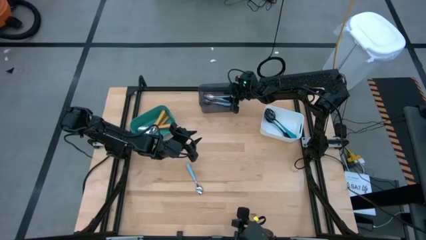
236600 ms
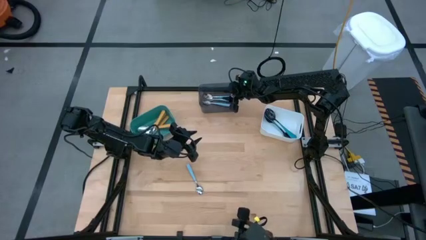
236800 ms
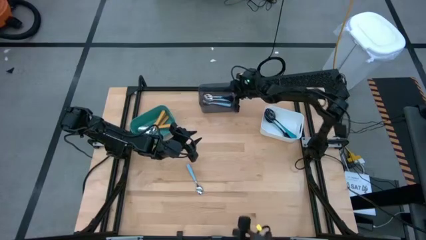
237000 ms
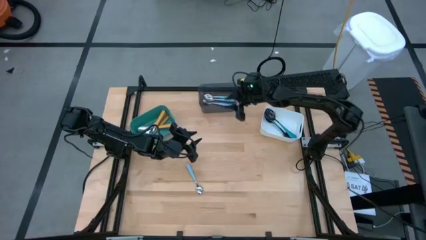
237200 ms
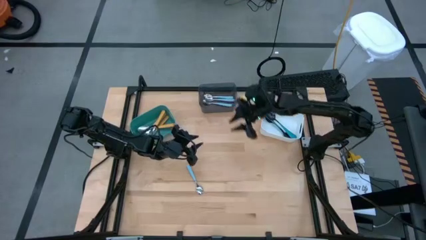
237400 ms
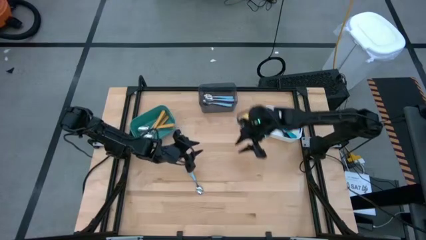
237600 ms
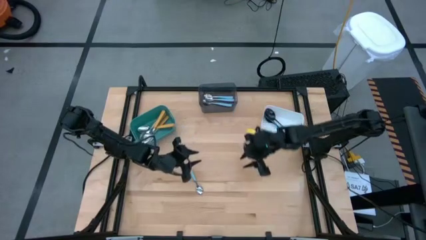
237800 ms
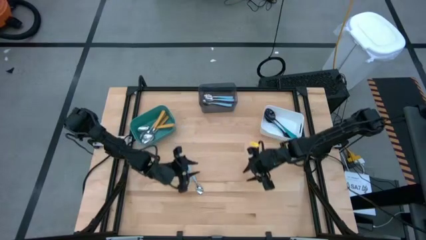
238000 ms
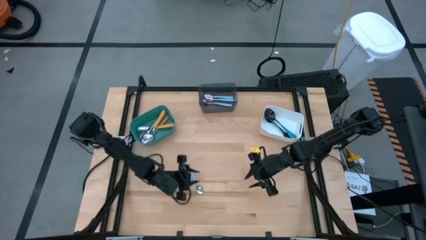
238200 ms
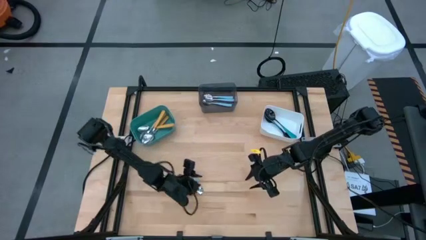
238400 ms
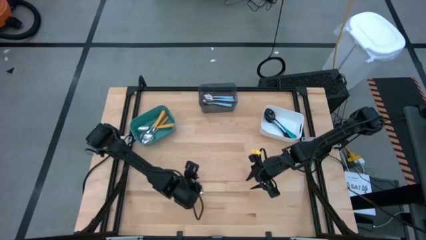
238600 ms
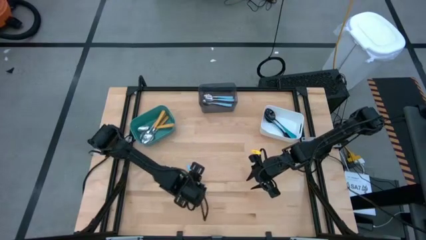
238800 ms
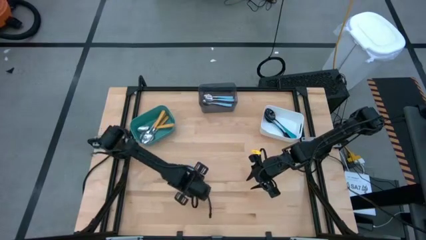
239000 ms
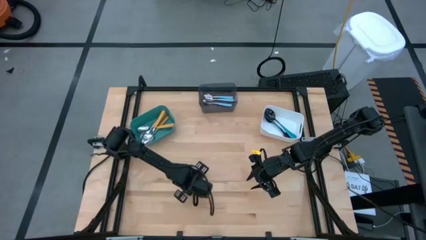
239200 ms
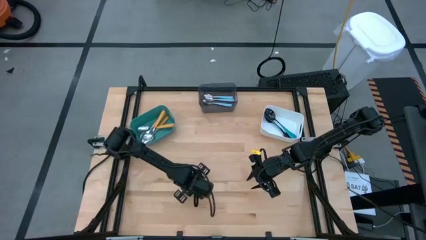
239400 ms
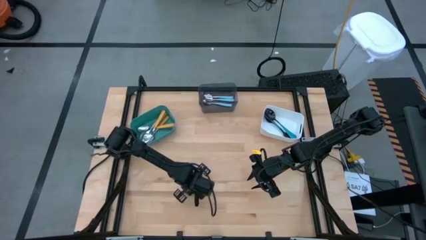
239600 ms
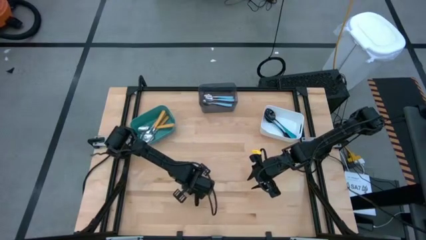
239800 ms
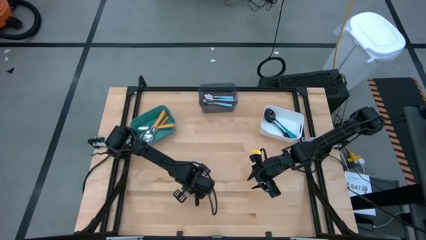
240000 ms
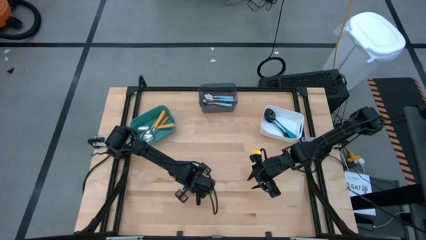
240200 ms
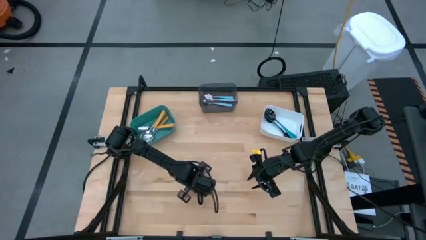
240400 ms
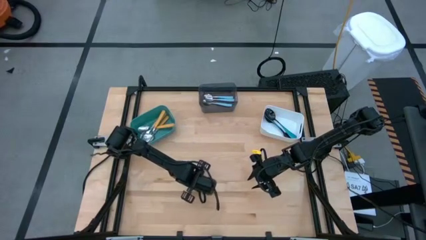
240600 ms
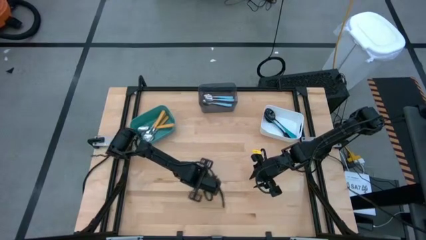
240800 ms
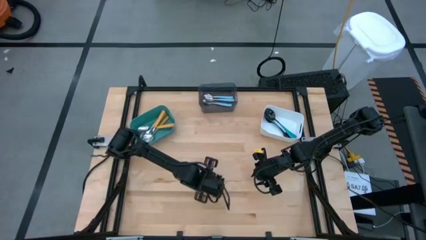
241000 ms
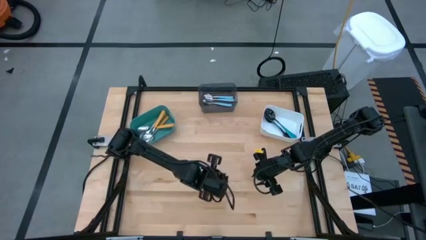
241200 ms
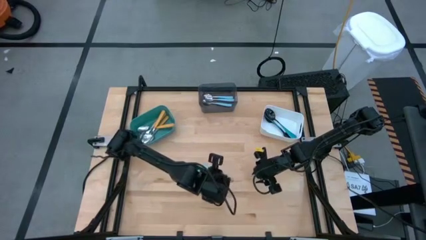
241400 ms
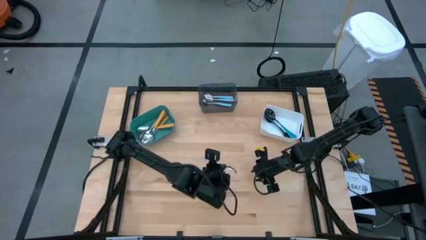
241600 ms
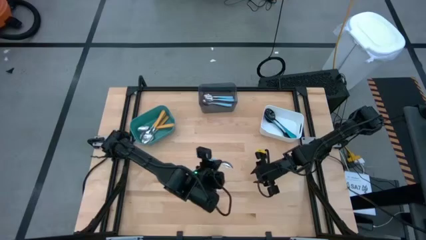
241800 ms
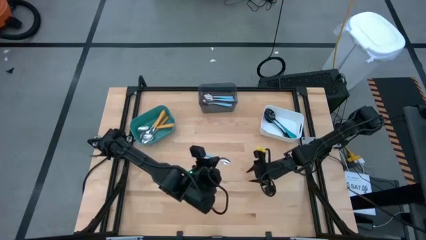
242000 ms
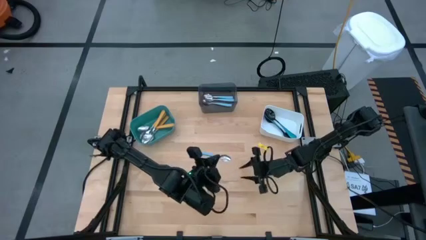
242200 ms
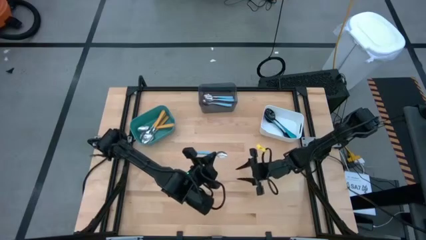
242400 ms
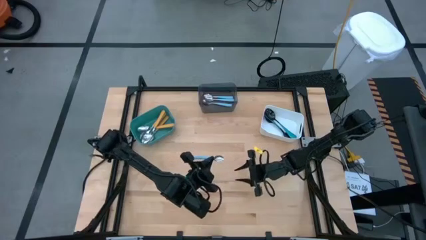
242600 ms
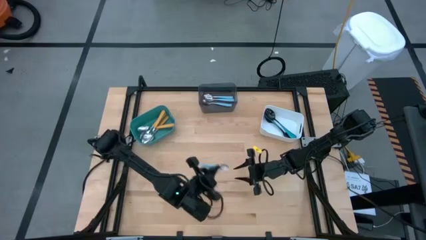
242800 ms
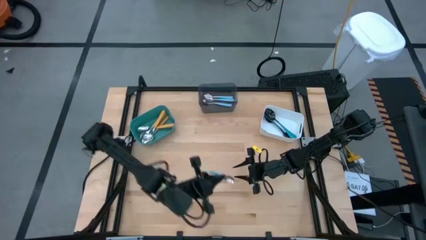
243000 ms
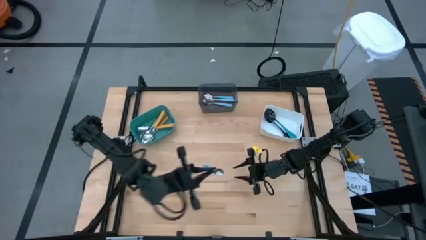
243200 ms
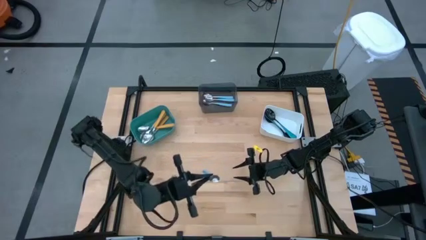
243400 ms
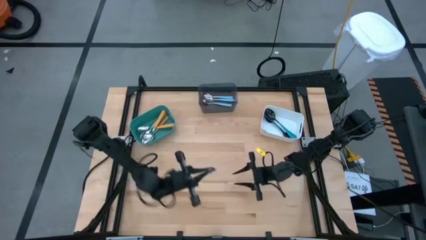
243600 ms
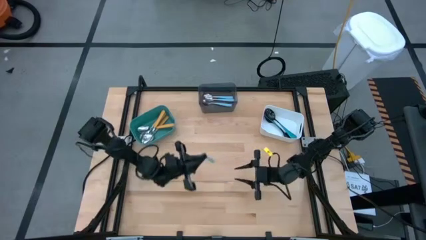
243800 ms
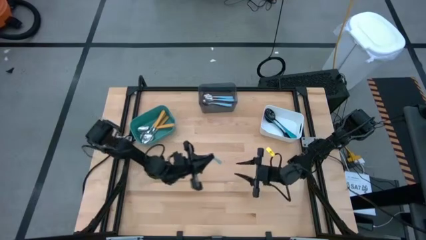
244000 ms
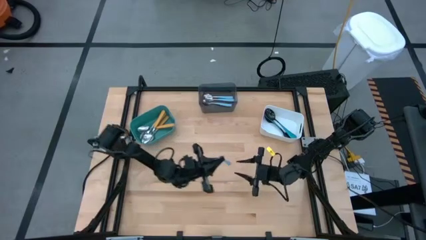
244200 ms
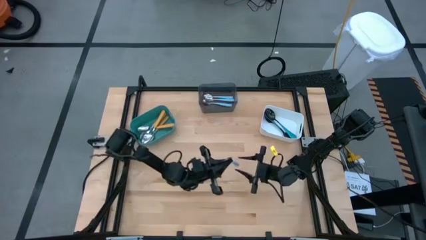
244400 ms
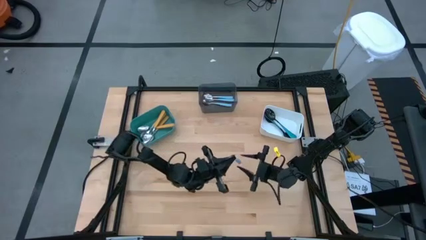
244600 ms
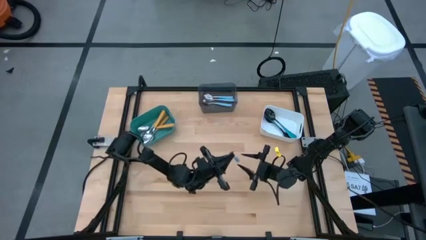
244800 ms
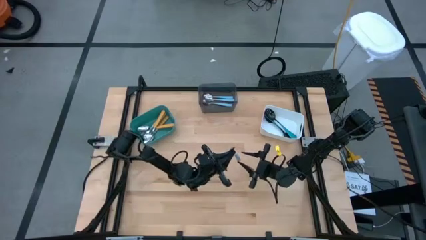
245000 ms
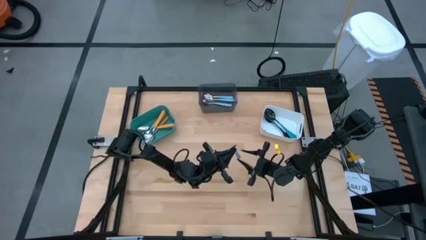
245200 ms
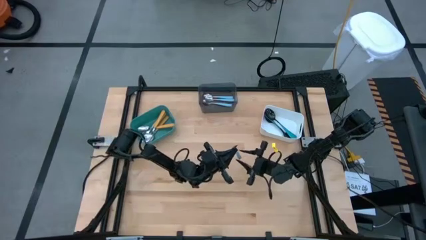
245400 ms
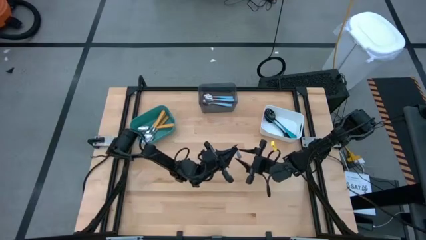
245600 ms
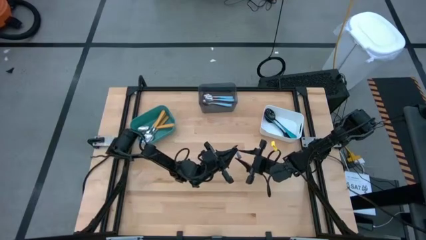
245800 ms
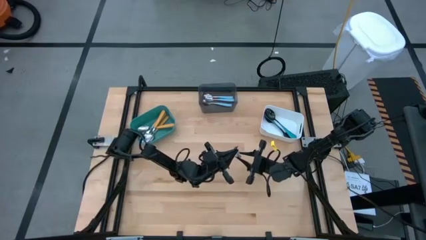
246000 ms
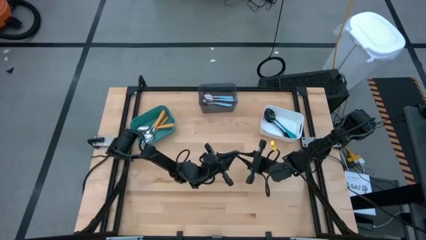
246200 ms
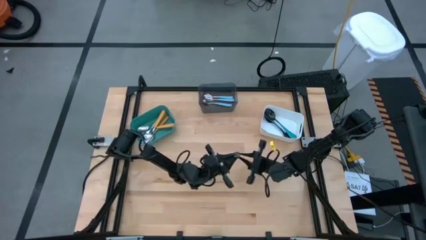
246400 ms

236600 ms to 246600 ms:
Task: Sort silverware by color (type)
Put the light blue spoon into the black bin
